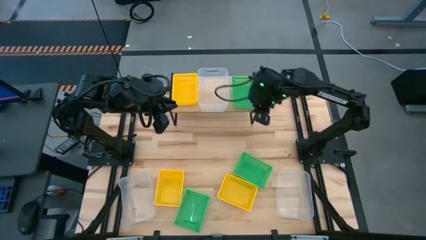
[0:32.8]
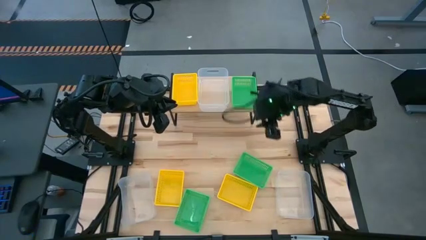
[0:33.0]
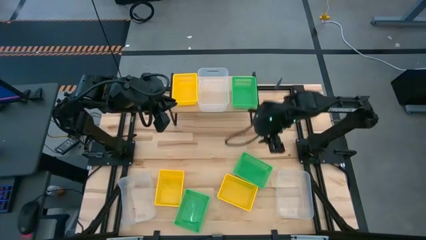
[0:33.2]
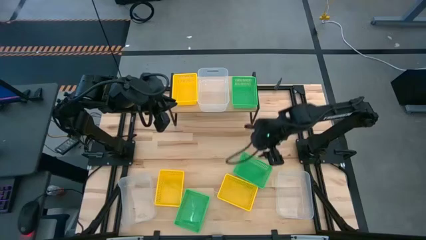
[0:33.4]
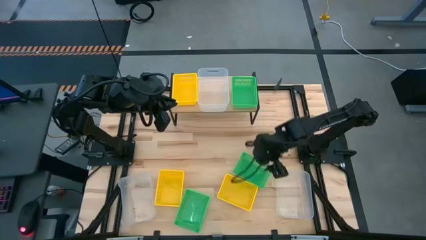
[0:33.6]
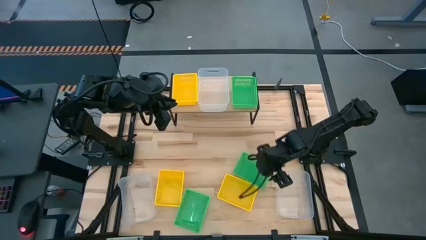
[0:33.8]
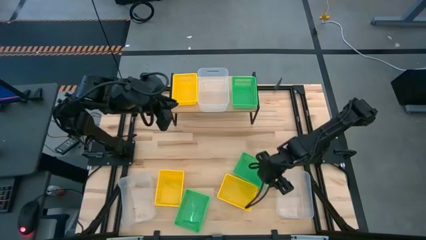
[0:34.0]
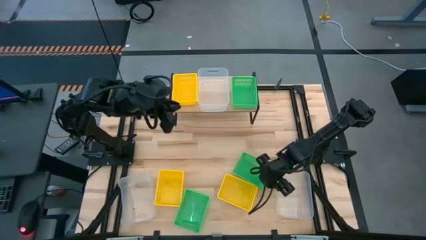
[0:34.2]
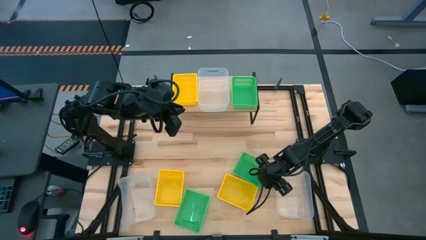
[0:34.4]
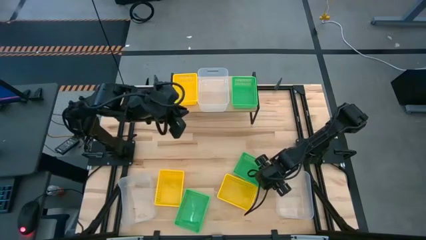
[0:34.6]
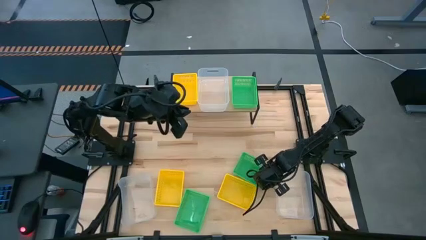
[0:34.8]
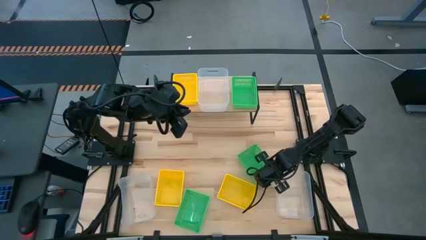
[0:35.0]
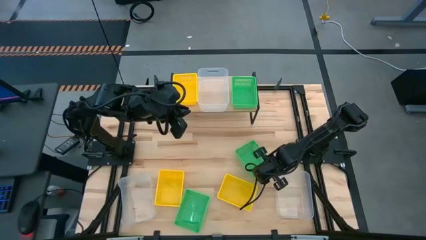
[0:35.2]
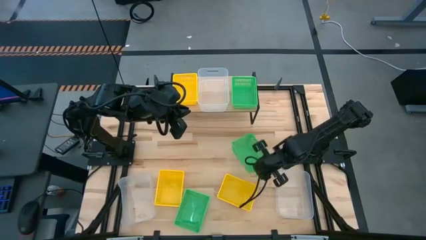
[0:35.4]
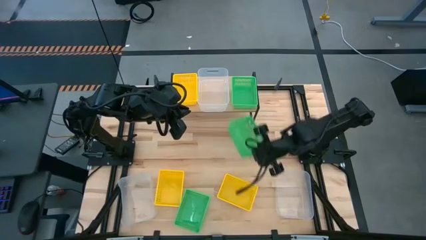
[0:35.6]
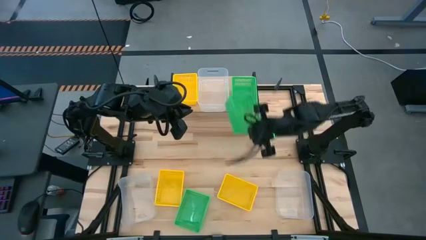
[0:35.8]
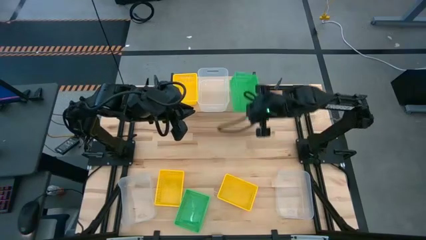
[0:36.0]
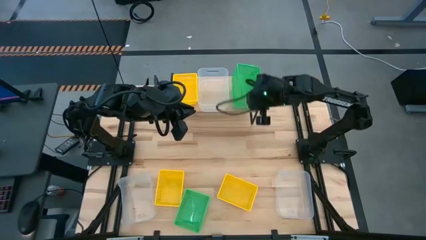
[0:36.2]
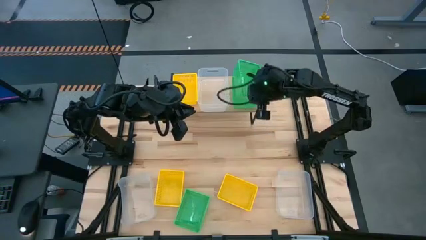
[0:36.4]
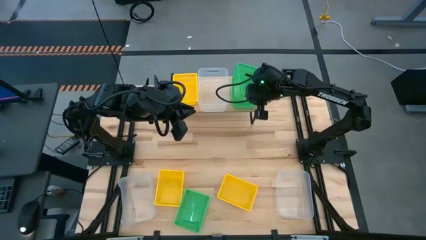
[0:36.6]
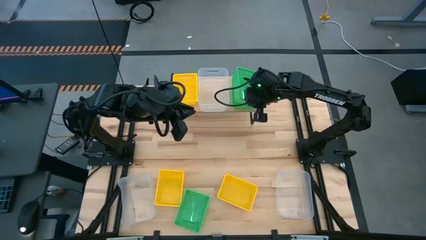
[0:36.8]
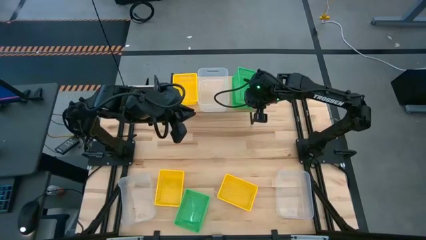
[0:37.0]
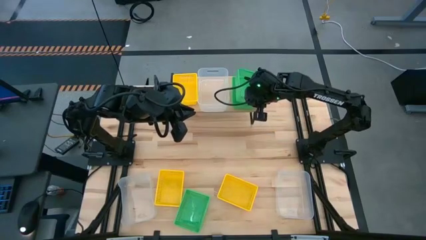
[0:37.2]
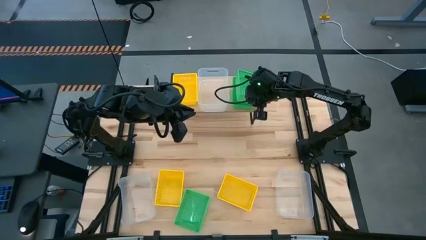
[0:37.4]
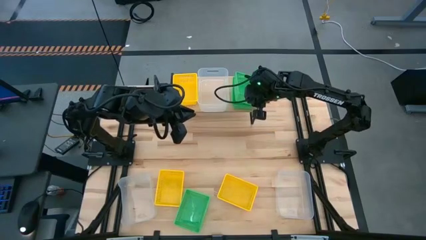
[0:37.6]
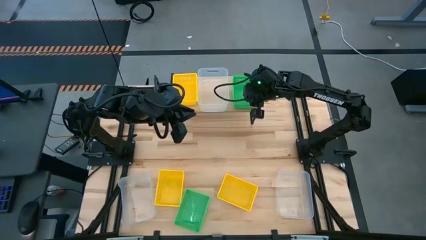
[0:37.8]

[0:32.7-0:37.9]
Task: Stack baskets on shelf by color
Stack the right green bin on top of the green bin on the shelf

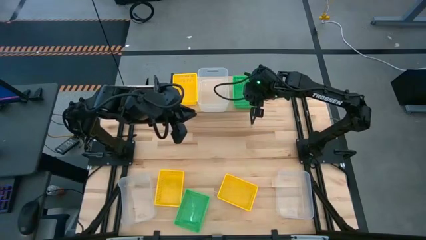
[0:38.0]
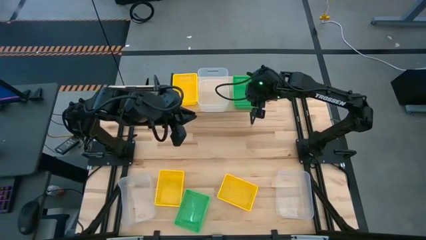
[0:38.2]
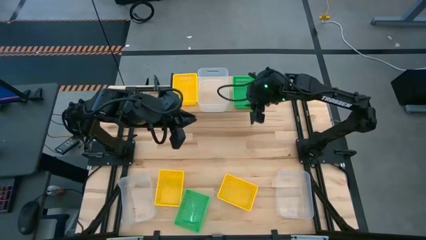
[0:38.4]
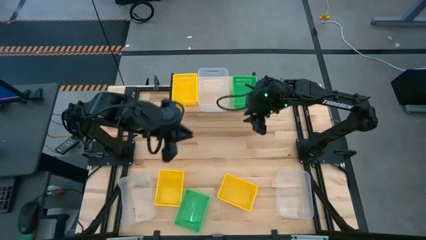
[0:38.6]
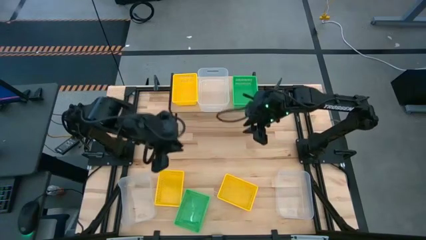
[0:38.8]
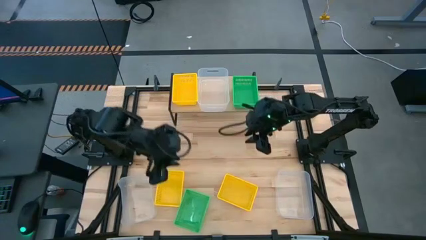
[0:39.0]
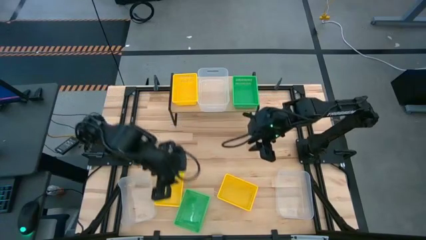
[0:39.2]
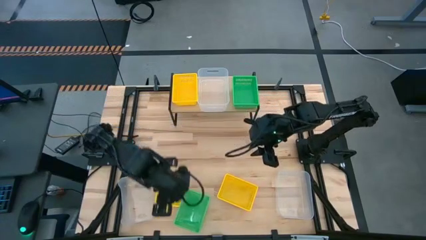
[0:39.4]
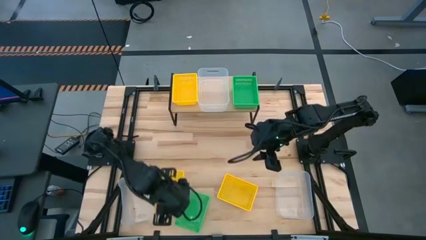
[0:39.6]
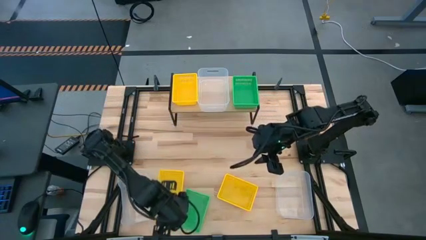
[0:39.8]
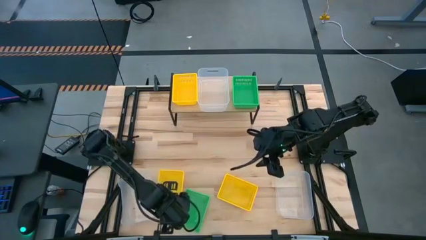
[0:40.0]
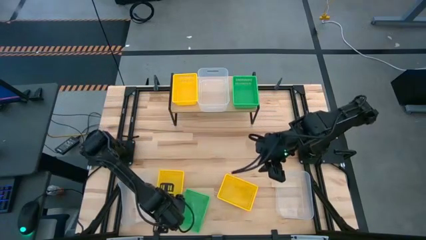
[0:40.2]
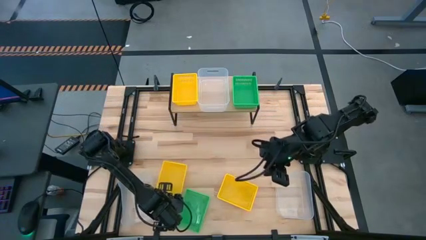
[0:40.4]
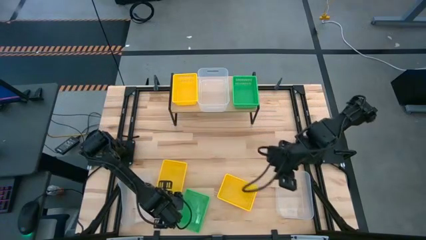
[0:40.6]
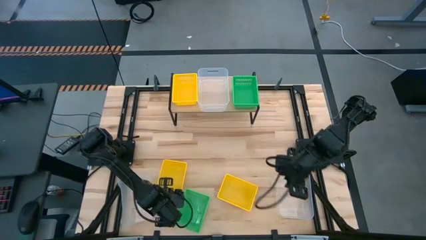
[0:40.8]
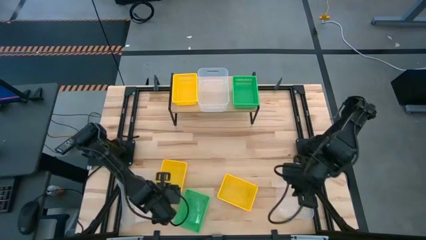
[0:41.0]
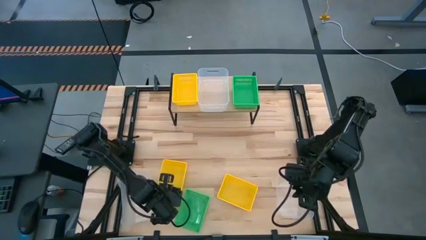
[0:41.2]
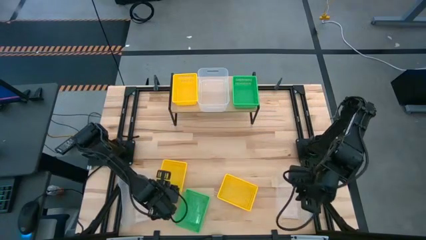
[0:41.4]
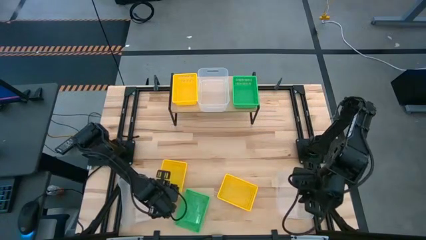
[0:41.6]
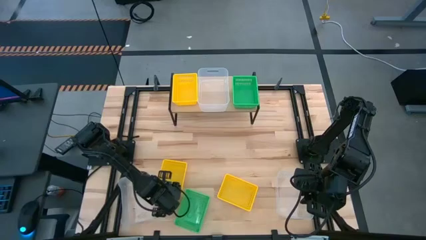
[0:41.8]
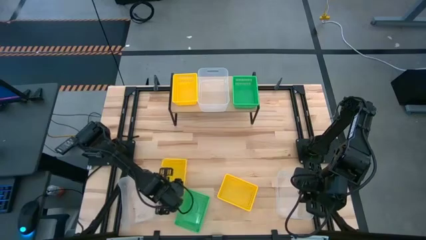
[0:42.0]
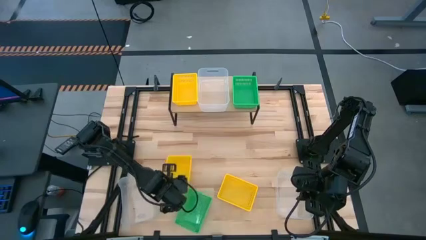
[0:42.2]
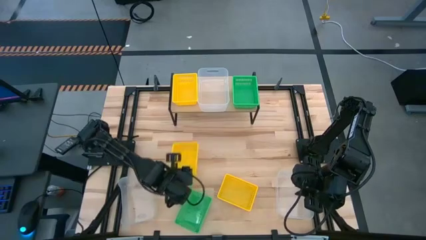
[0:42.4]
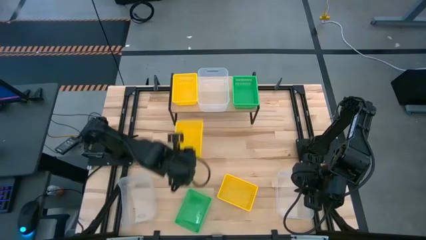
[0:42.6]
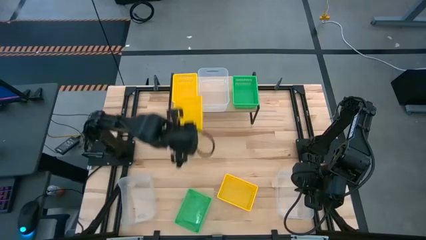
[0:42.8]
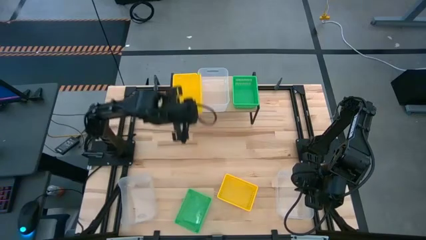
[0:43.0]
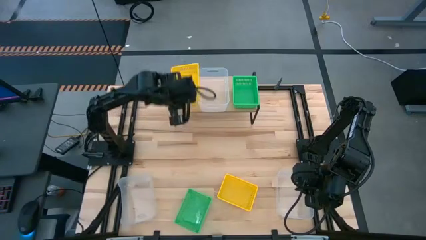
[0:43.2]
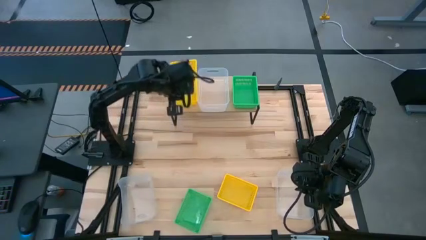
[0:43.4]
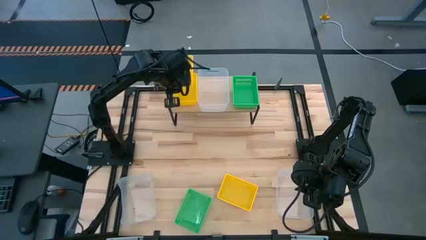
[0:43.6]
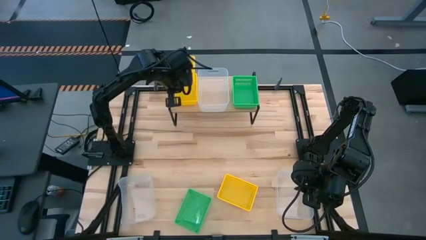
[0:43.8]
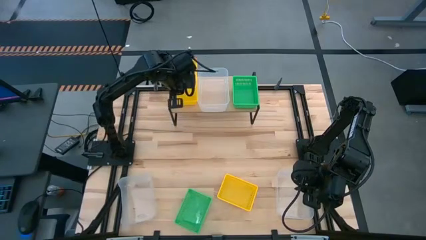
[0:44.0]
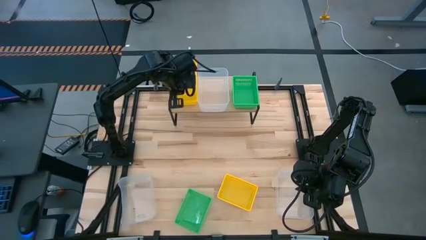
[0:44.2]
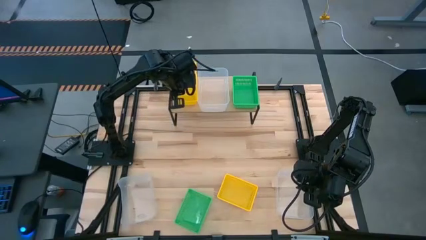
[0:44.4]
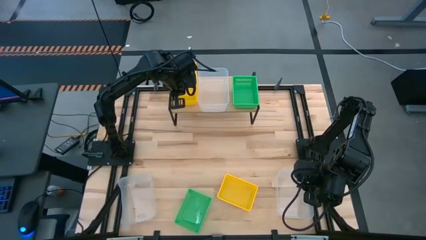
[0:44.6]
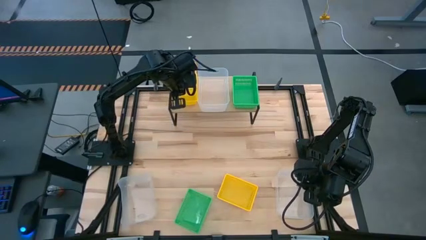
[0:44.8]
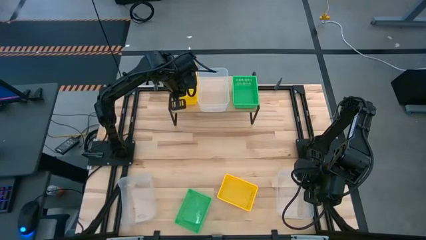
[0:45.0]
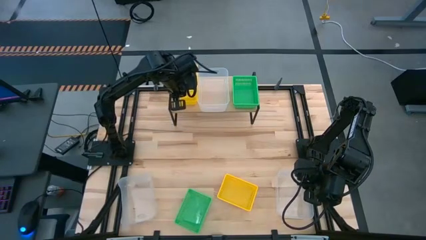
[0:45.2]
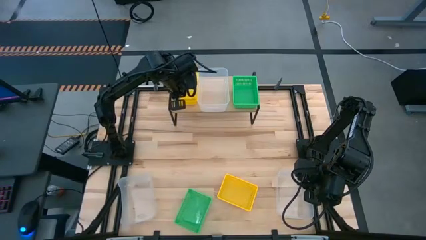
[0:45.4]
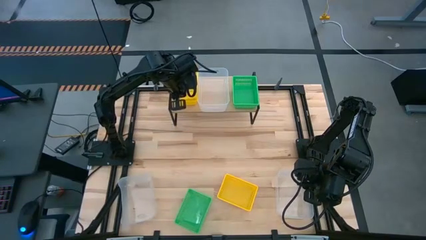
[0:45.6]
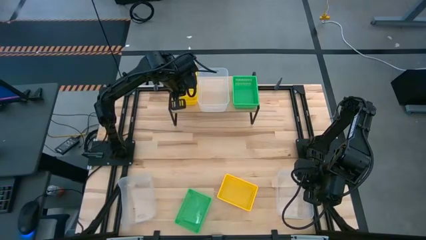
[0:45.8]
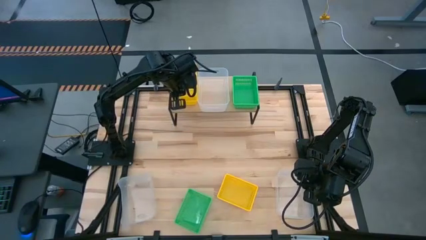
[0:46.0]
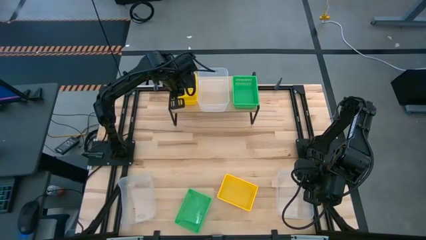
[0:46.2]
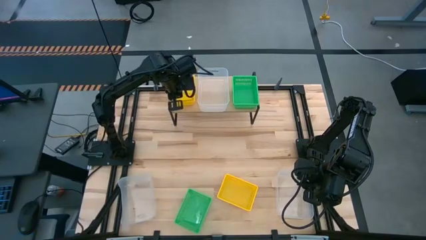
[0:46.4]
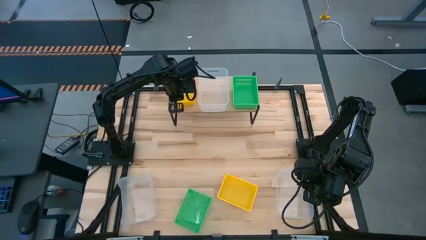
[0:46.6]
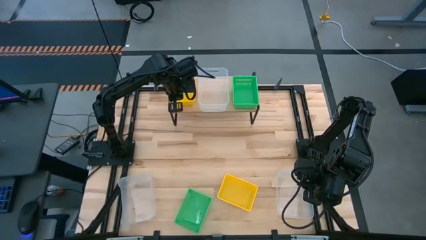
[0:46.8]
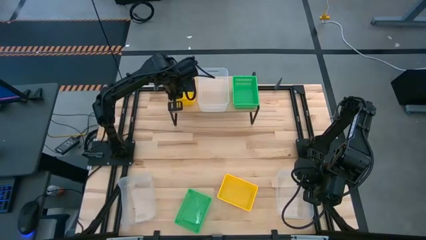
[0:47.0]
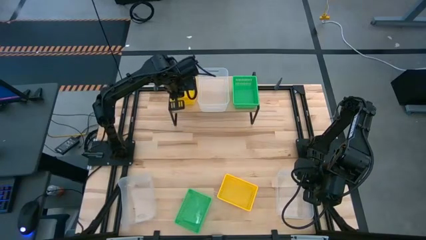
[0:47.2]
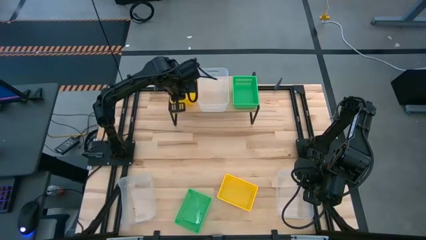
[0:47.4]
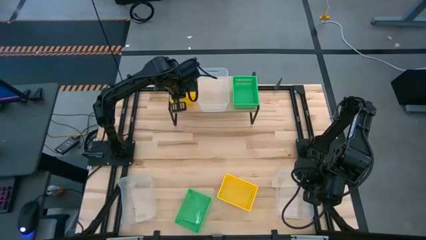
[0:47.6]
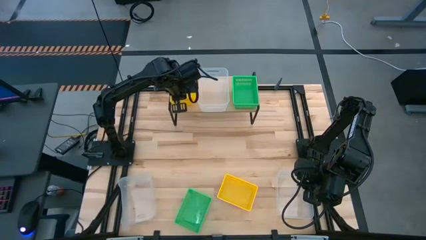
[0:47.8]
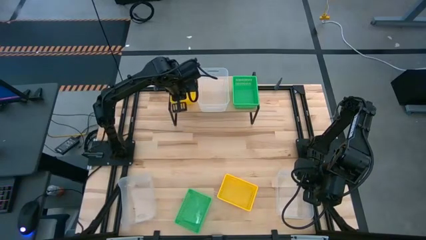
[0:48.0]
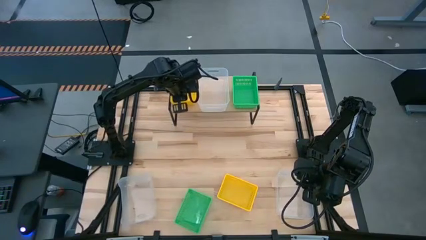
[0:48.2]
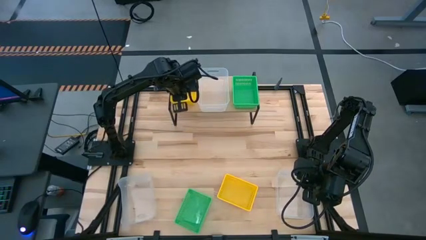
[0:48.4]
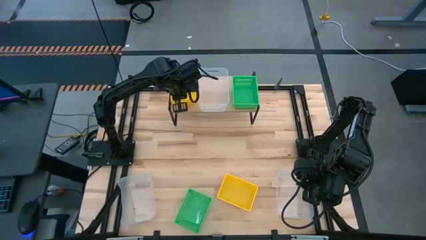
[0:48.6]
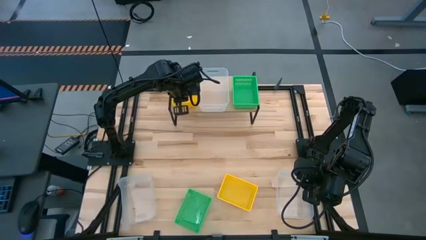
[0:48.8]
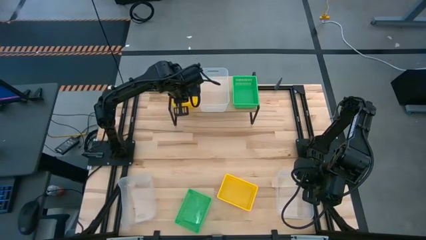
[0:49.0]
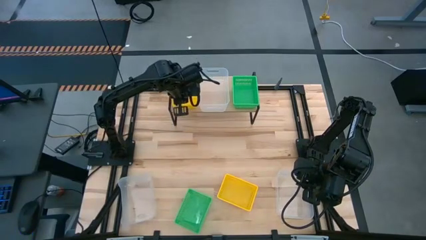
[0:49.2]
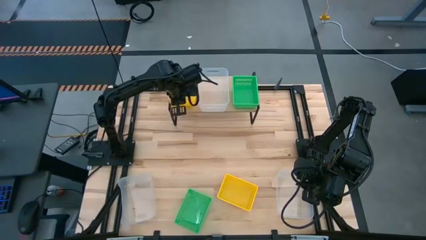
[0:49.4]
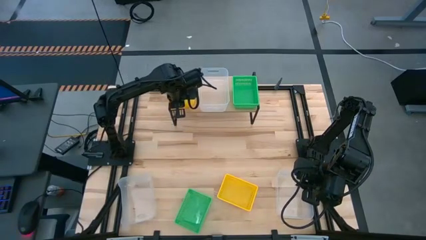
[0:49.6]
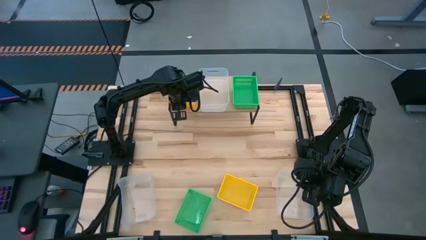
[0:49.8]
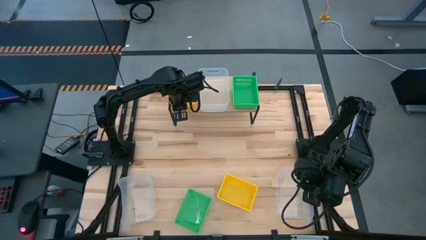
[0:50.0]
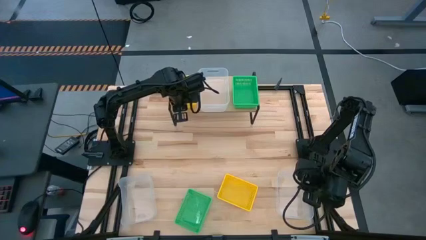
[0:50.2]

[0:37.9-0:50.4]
Stack the left yellow bin on top of the yellow bin on the shelf

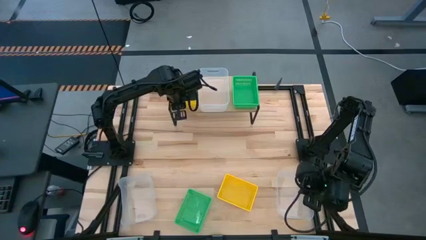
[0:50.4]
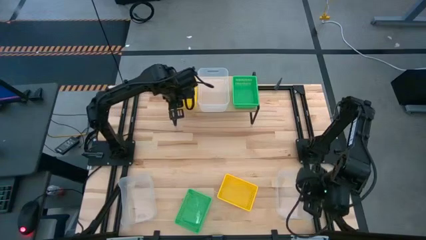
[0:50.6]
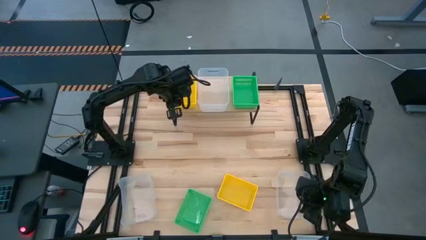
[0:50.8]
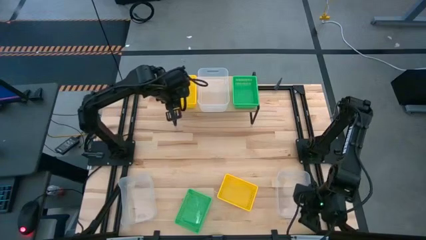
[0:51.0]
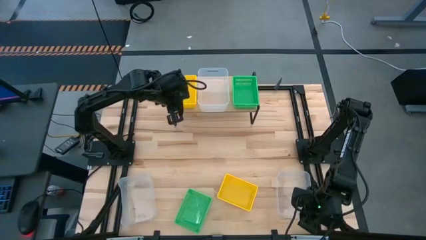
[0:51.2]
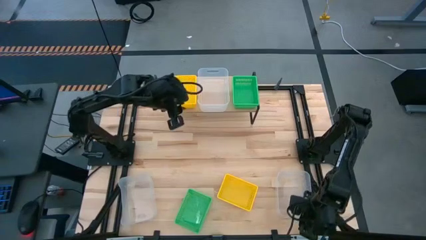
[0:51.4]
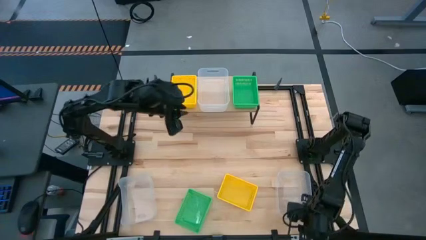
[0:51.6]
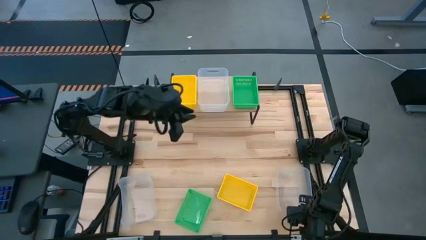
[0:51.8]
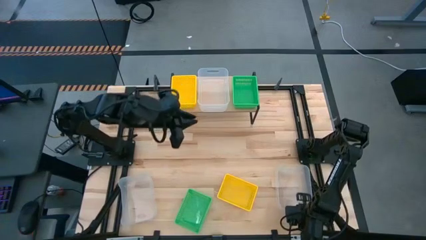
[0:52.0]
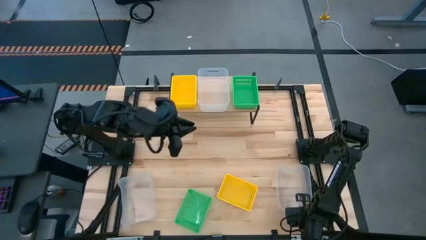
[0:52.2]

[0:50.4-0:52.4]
Stack the right transparent bin on top of the transparent bin on the shelf
